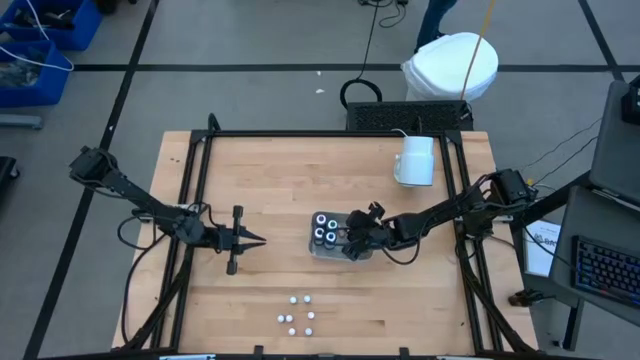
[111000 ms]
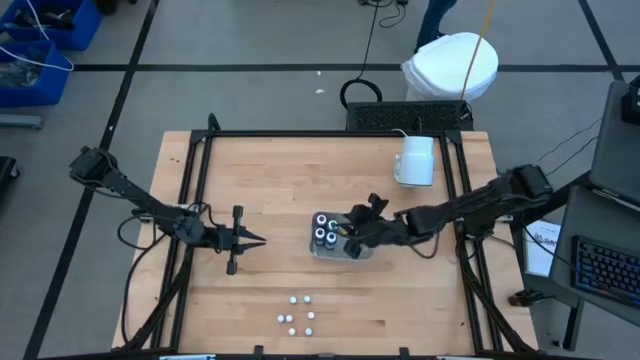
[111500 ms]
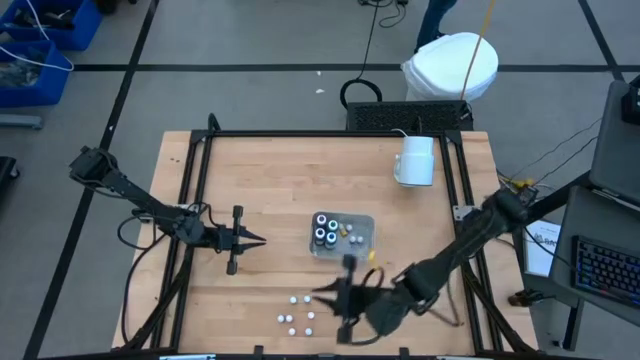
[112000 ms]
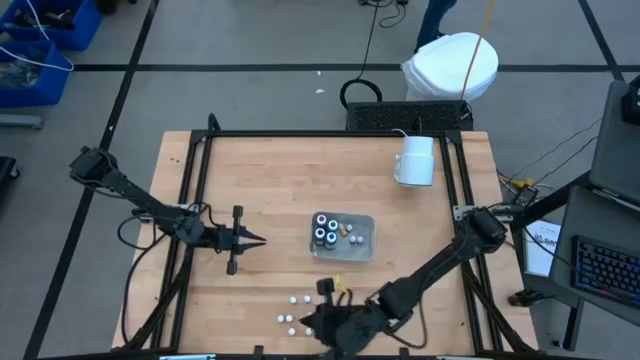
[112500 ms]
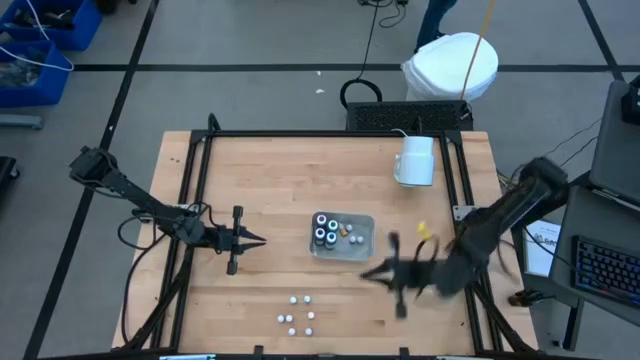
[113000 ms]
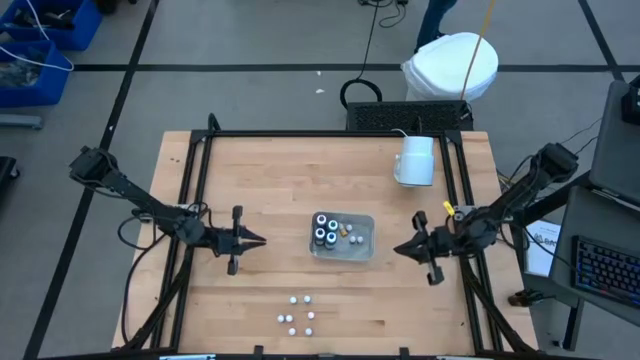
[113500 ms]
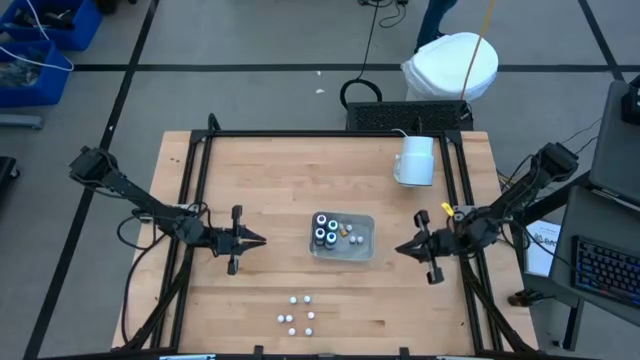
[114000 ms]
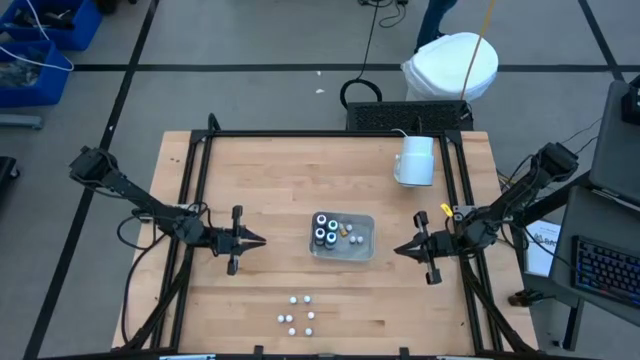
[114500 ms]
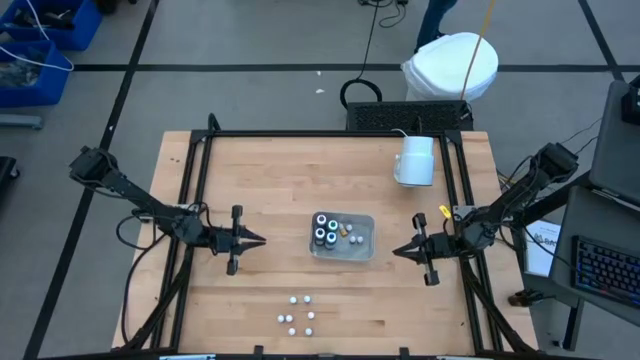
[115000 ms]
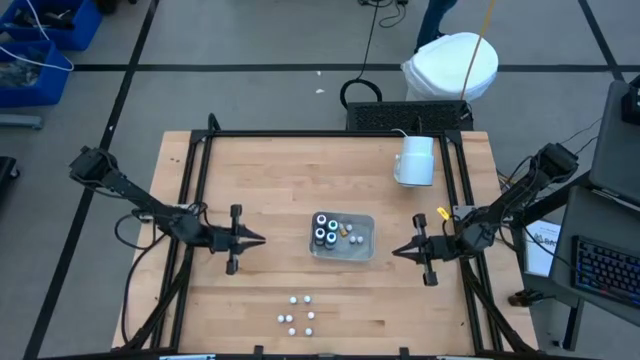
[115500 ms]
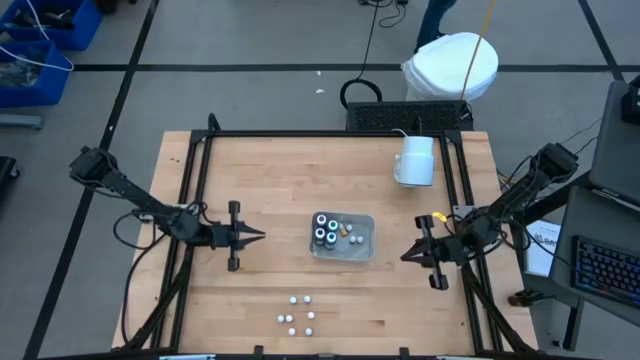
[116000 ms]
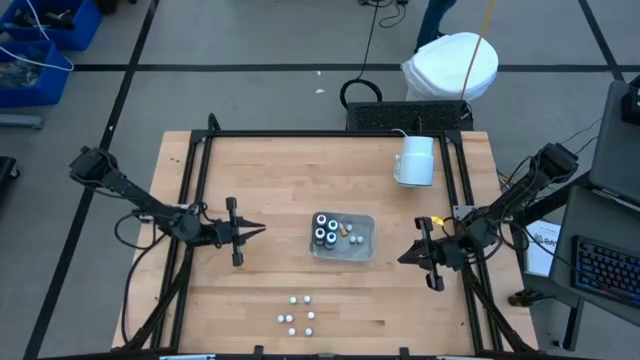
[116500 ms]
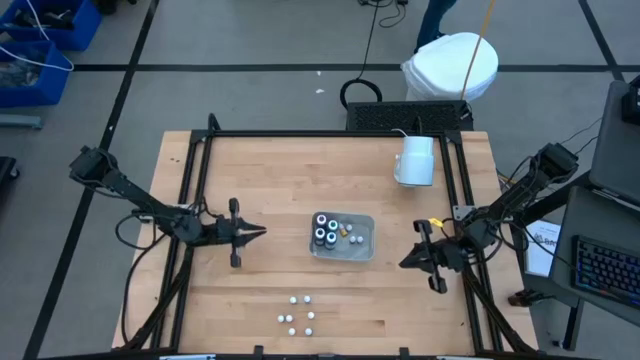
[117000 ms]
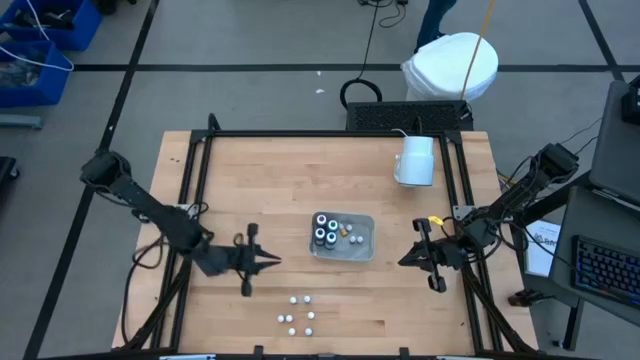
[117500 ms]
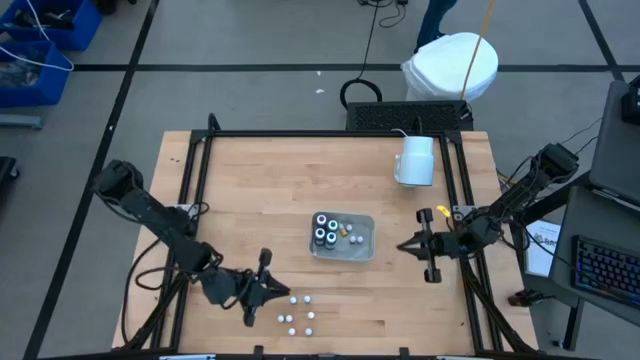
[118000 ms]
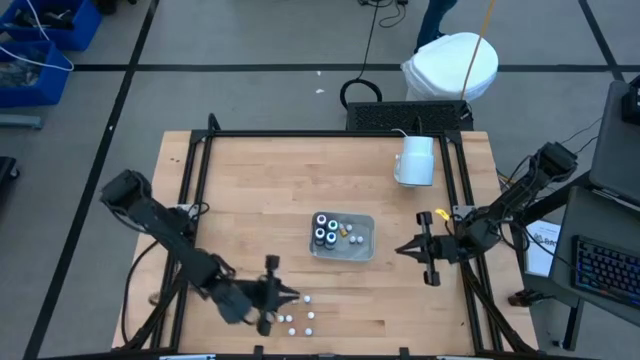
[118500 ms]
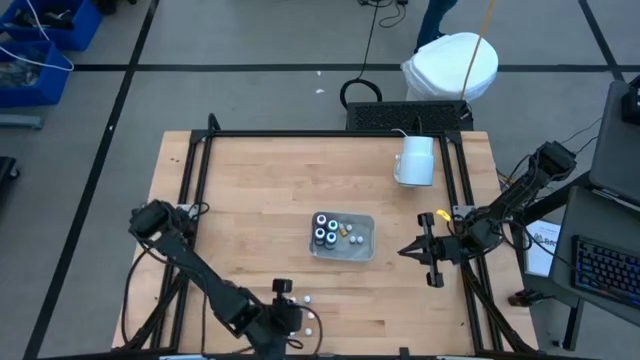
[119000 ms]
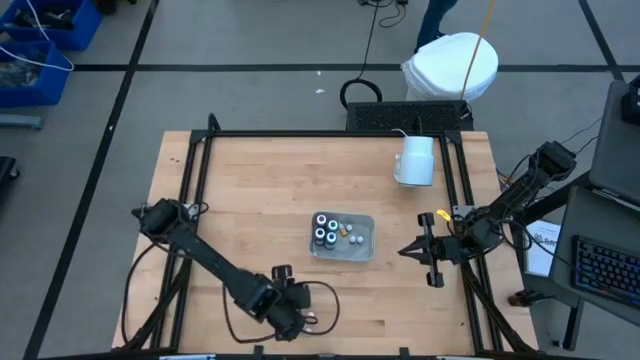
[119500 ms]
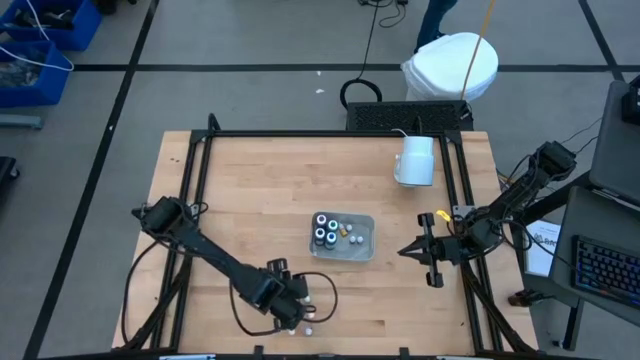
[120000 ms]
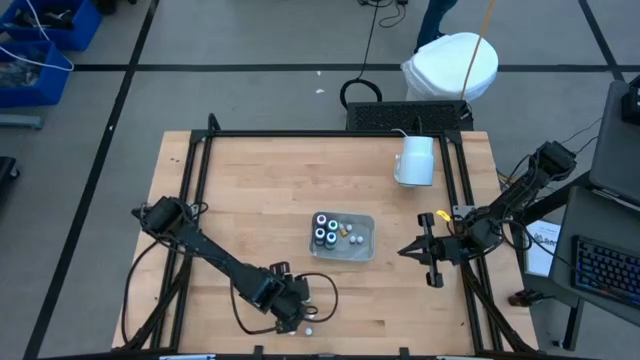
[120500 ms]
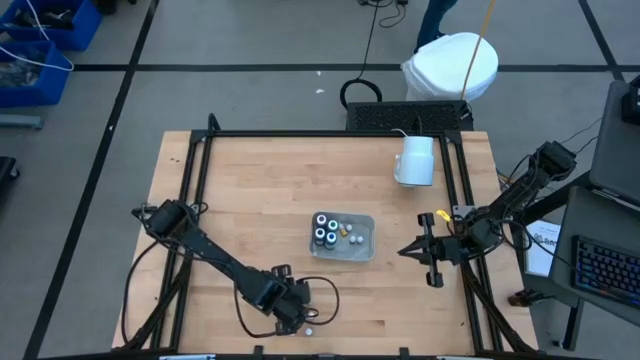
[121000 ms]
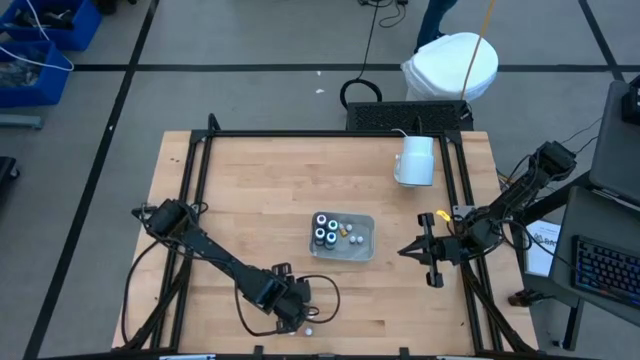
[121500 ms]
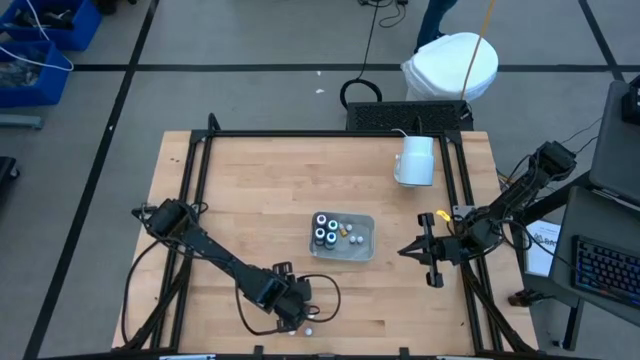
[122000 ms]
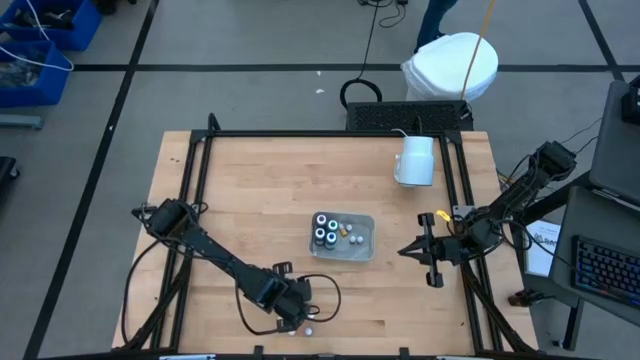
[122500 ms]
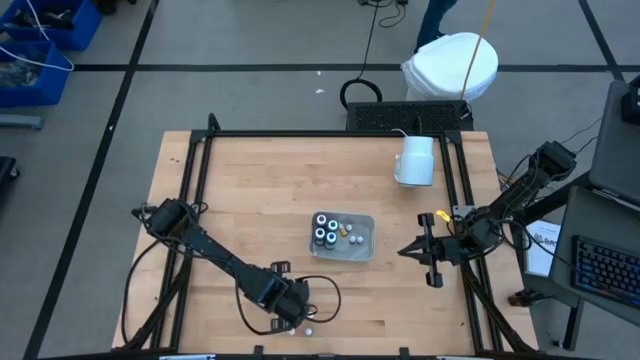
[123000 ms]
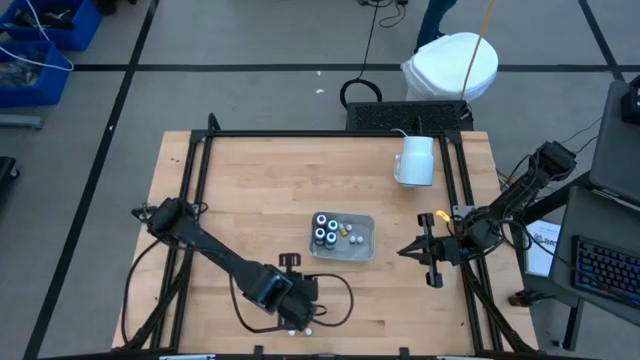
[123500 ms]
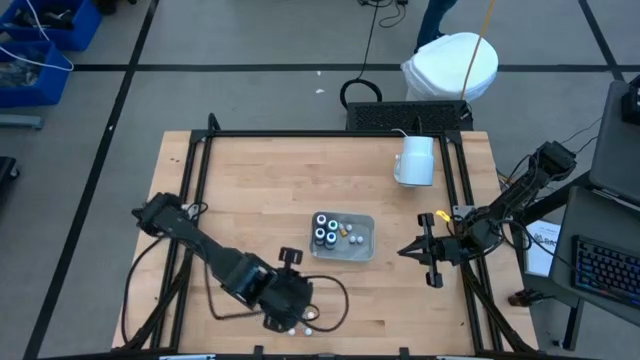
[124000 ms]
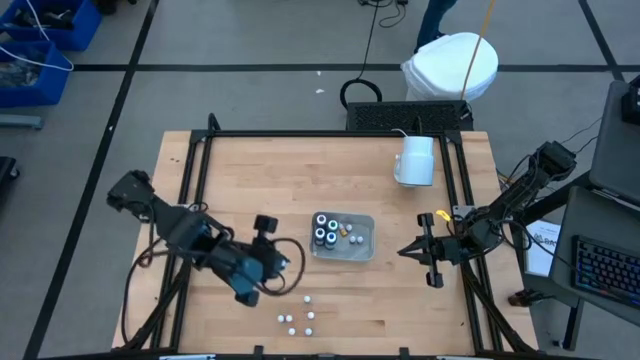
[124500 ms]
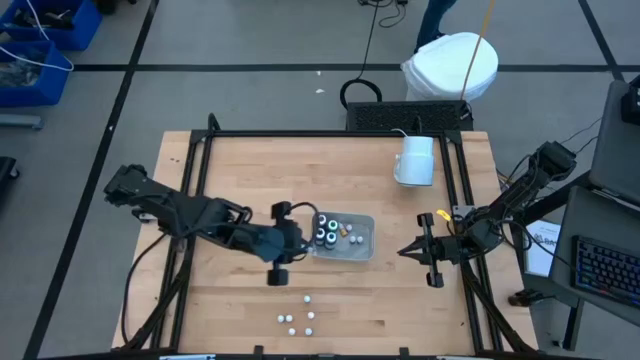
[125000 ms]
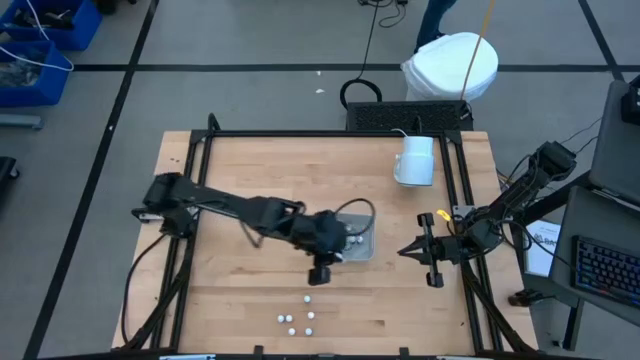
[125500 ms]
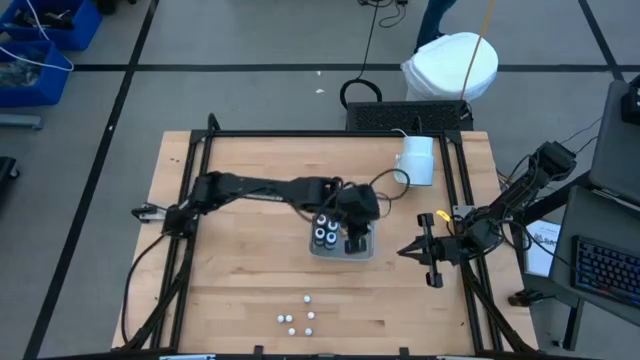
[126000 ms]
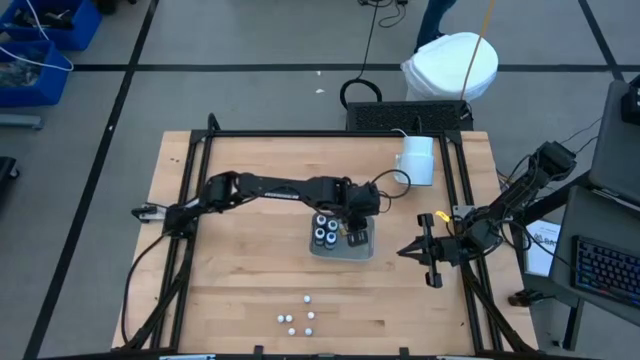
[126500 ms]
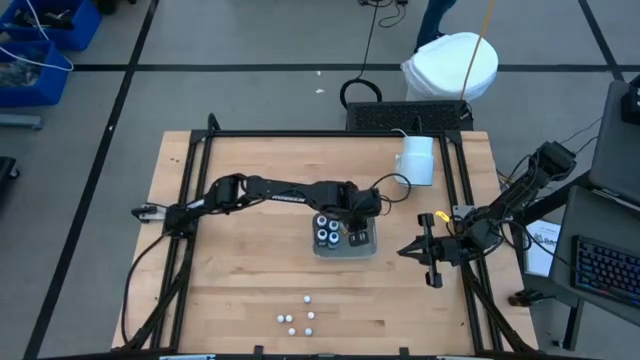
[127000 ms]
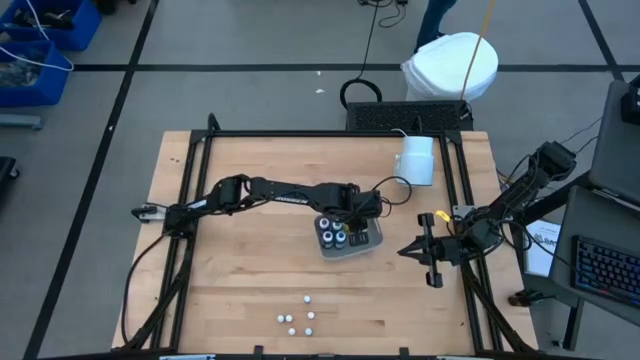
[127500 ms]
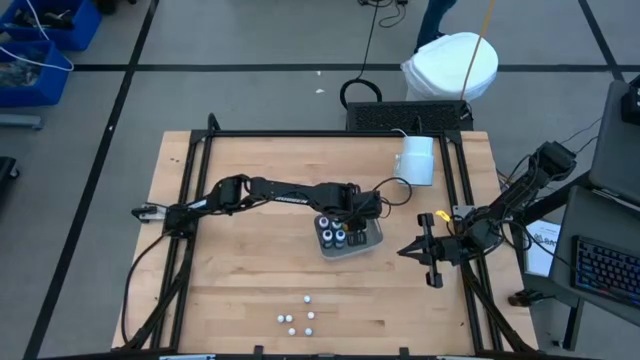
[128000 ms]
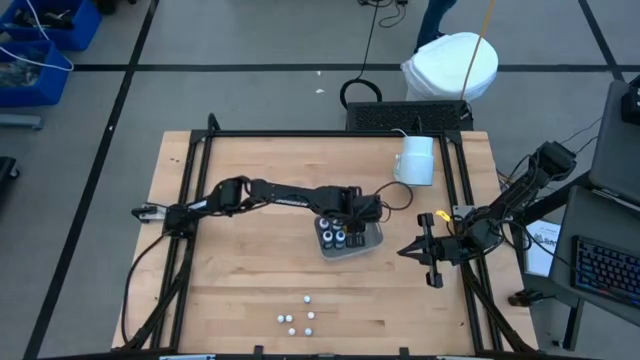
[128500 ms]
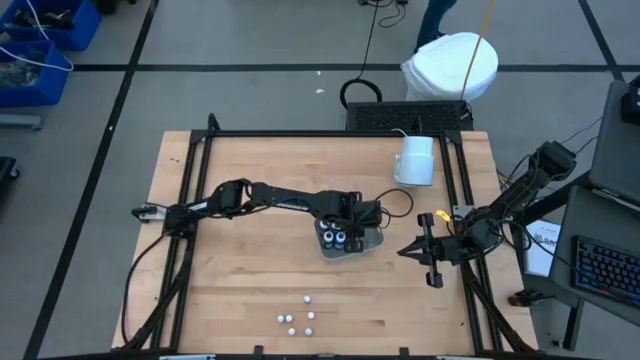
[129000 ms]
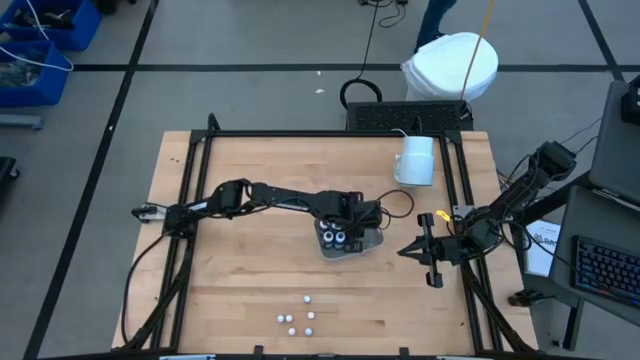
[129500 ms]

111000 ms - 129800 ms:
Task: Pick & Place food coloring
Put the small black food coloring into the gray bin

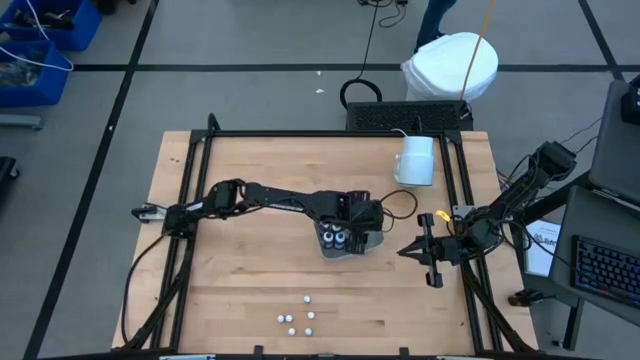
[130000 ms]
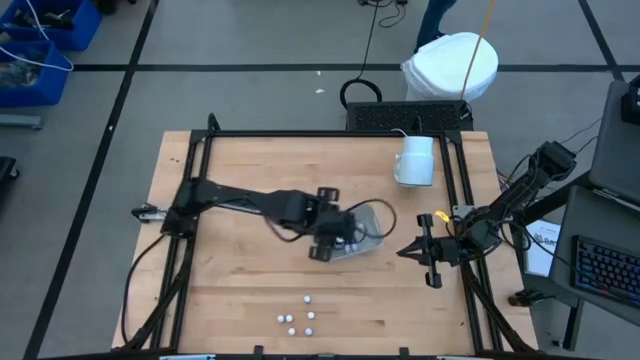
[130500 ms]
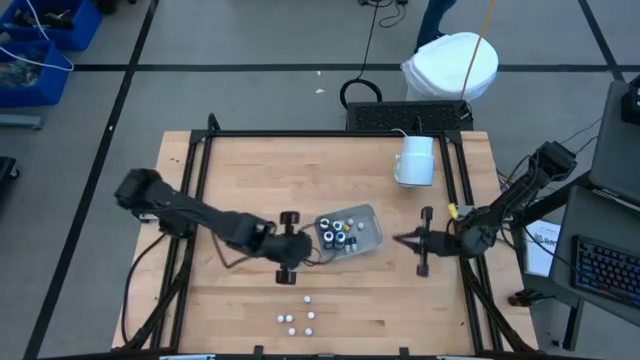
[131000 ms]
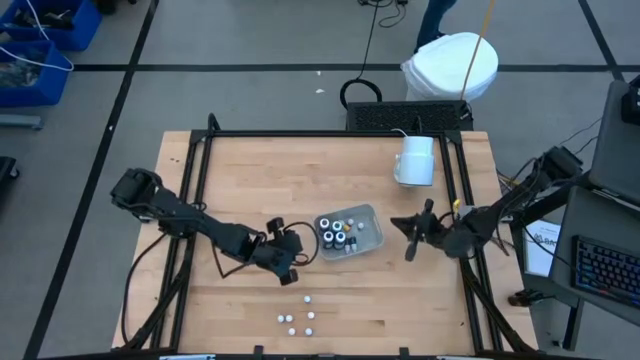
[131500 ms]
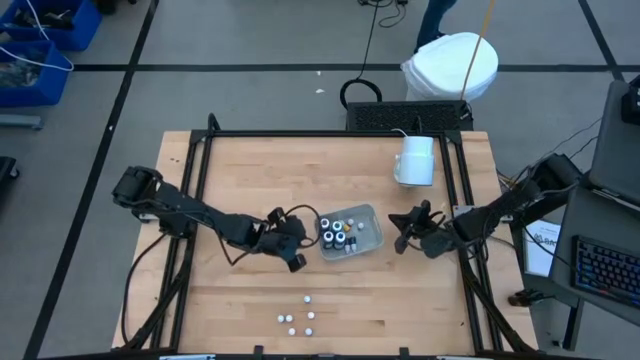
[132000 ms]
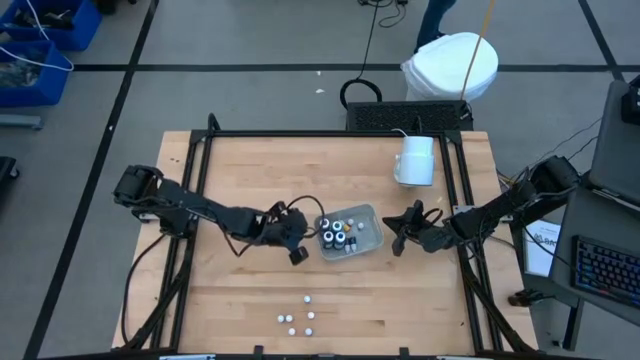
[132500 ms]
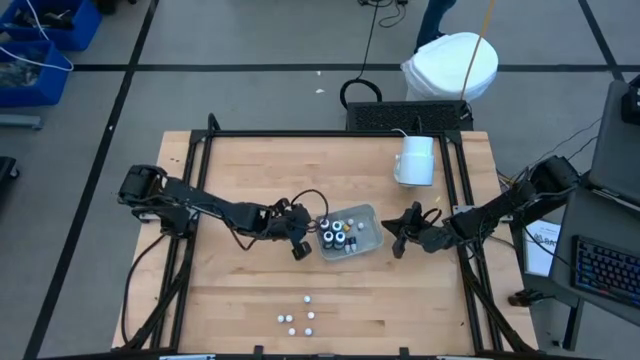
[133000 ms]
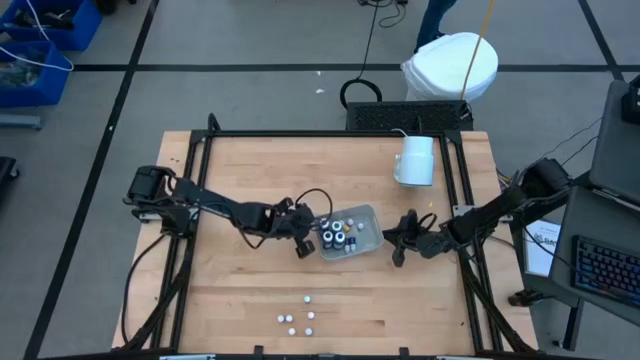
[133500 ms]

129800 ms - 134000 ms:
Adjust the gray bin
